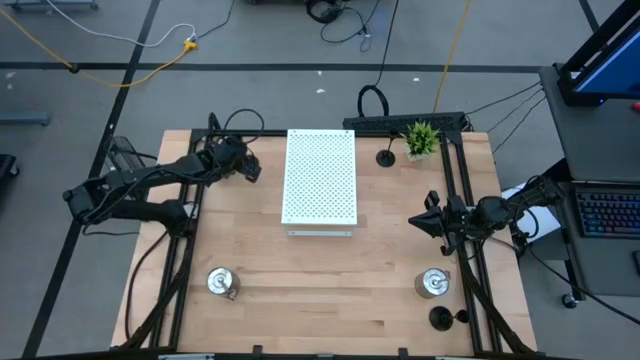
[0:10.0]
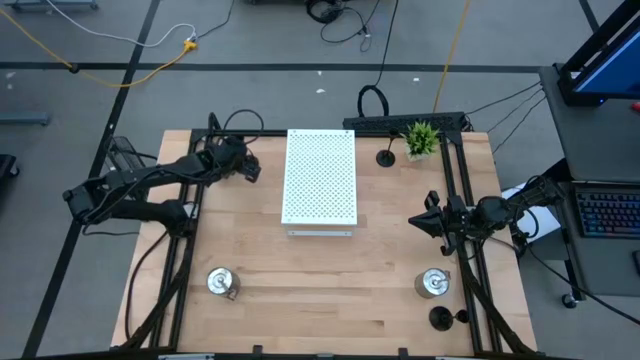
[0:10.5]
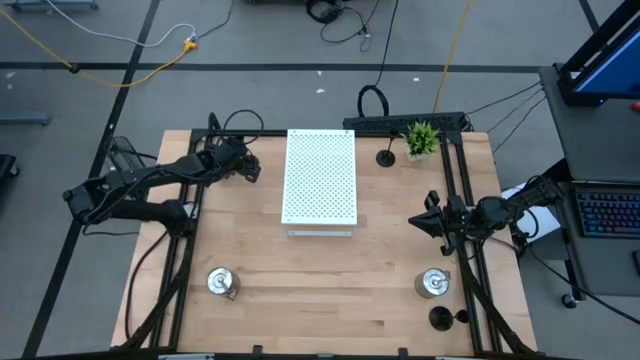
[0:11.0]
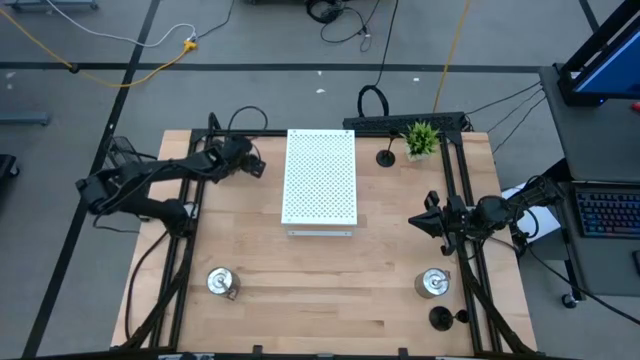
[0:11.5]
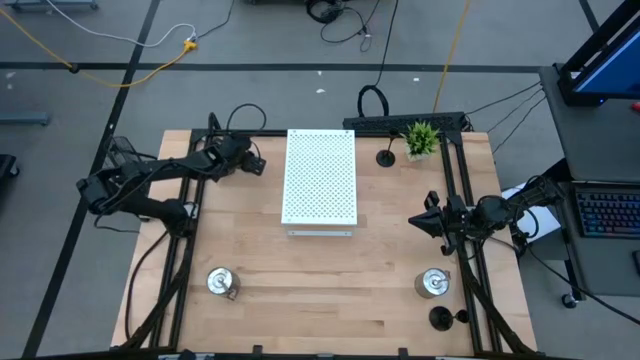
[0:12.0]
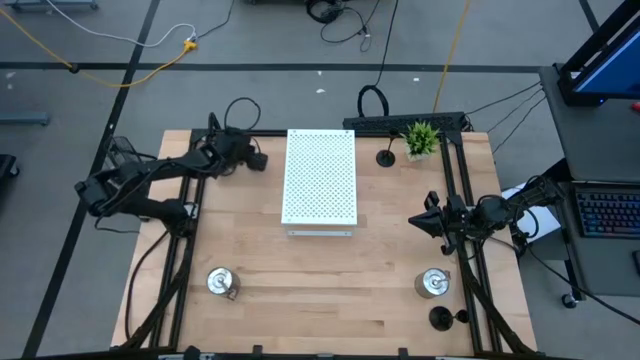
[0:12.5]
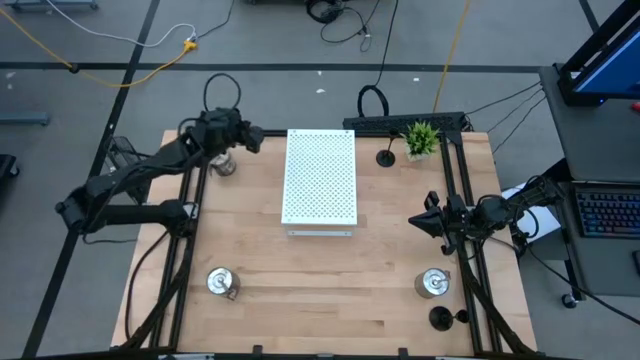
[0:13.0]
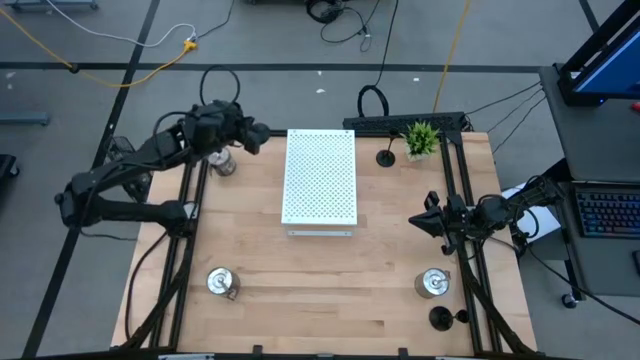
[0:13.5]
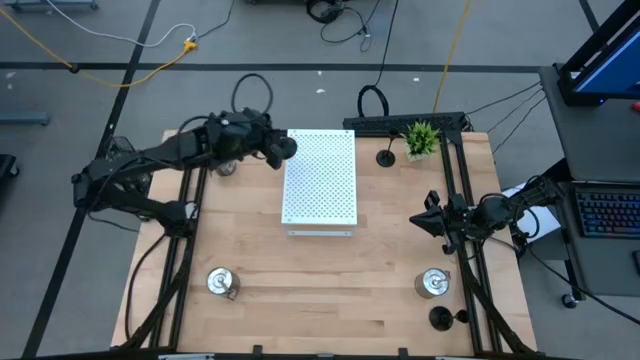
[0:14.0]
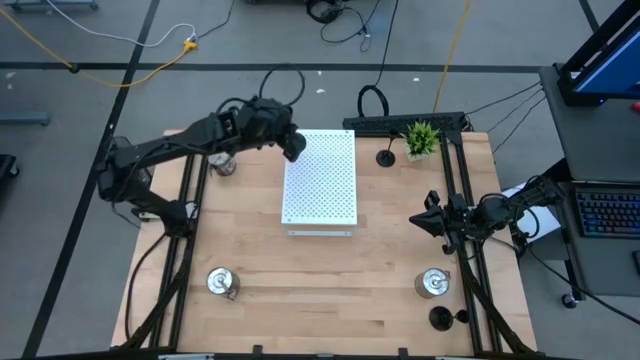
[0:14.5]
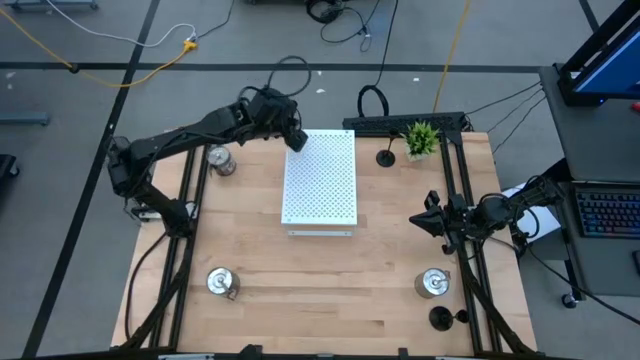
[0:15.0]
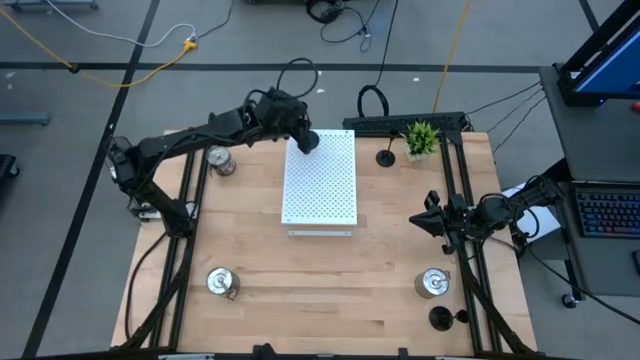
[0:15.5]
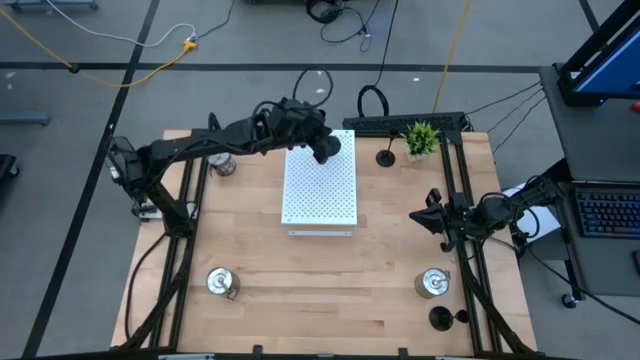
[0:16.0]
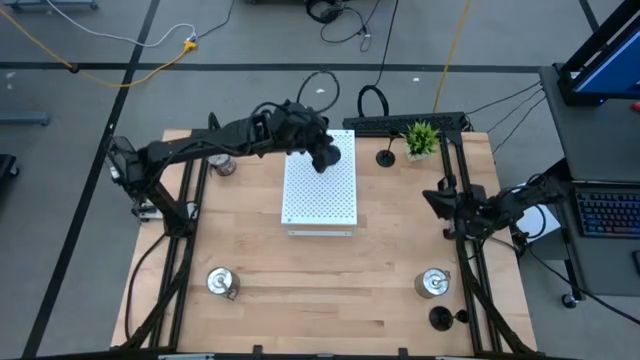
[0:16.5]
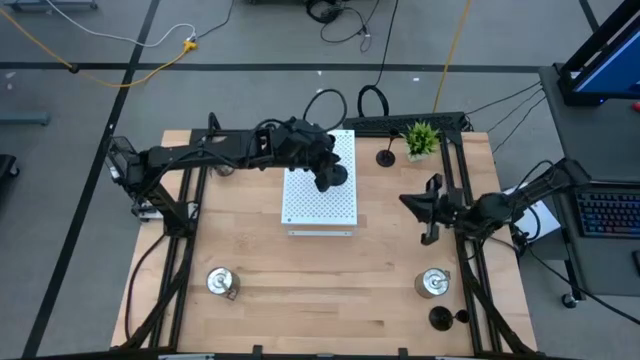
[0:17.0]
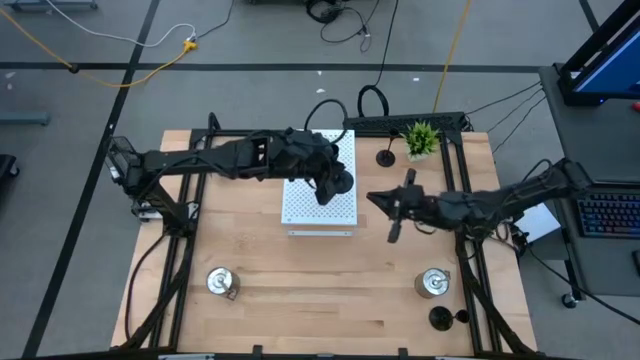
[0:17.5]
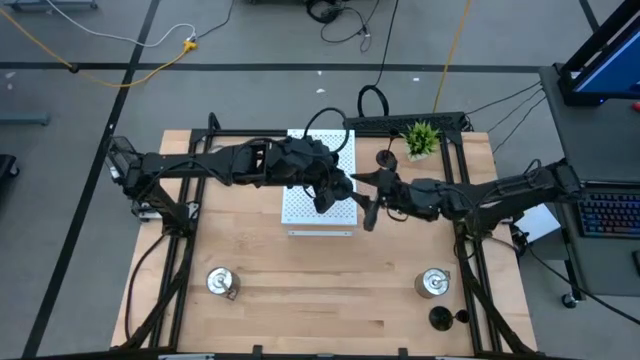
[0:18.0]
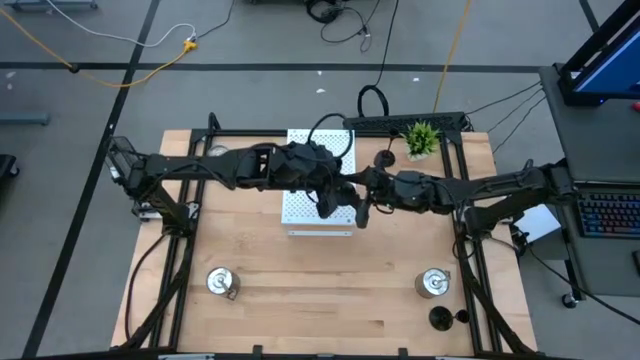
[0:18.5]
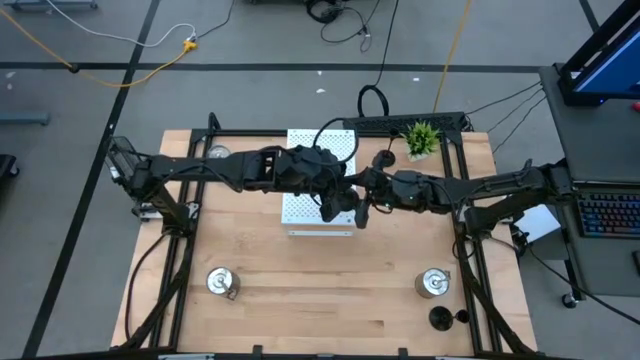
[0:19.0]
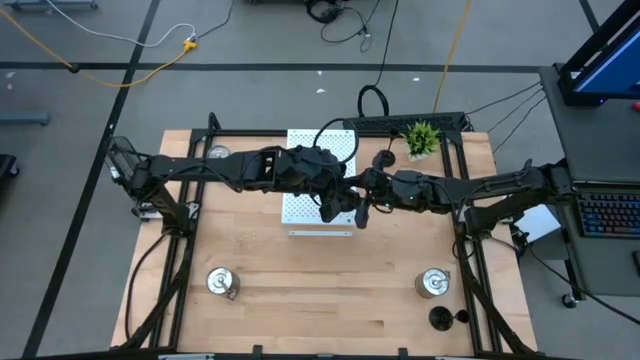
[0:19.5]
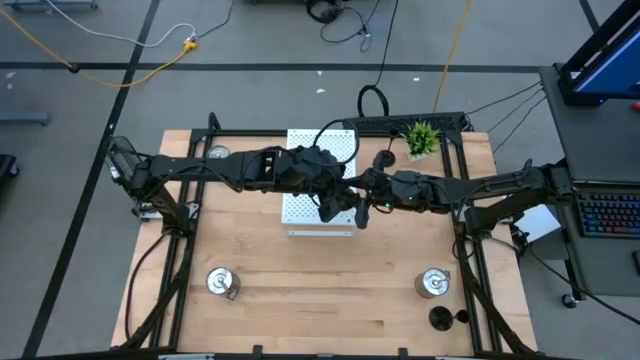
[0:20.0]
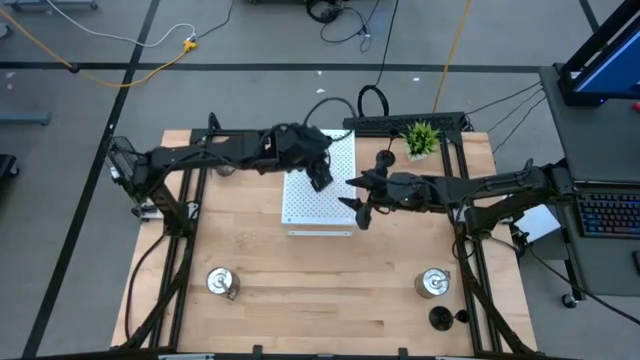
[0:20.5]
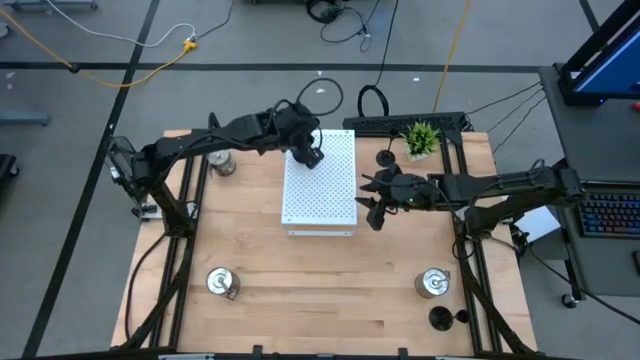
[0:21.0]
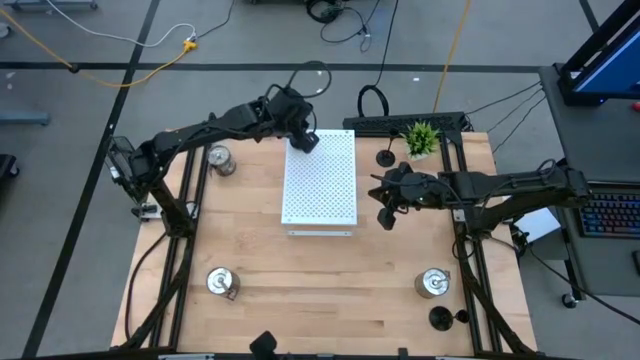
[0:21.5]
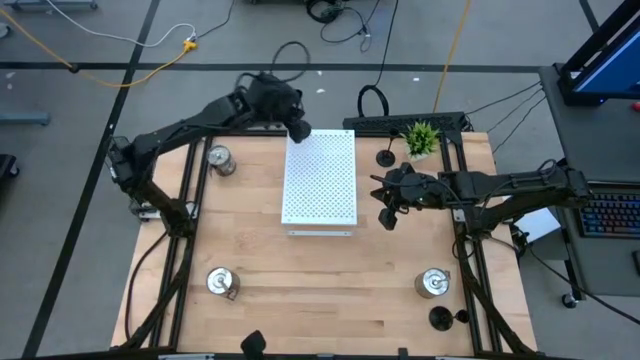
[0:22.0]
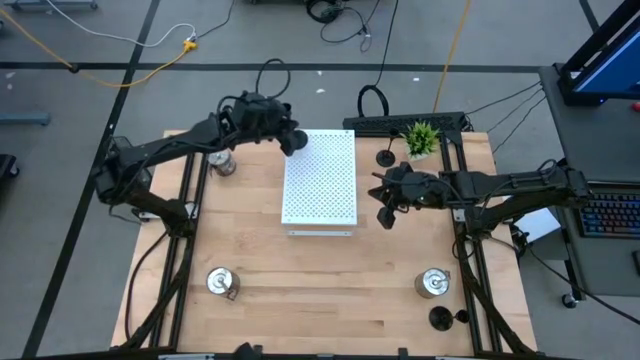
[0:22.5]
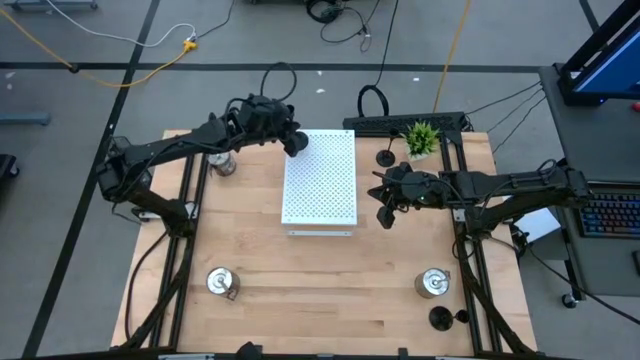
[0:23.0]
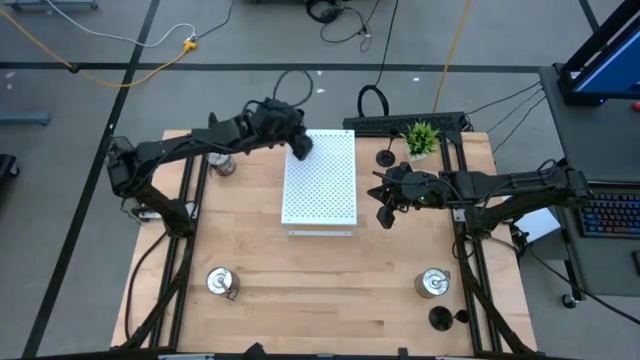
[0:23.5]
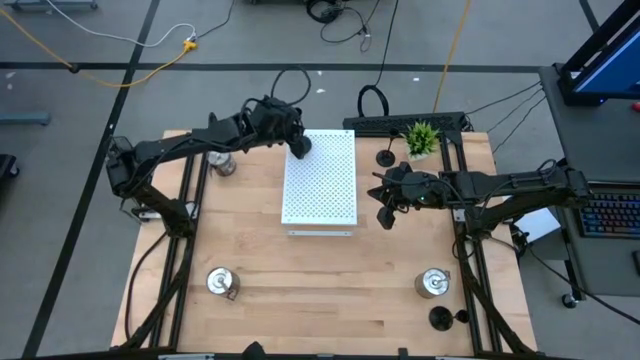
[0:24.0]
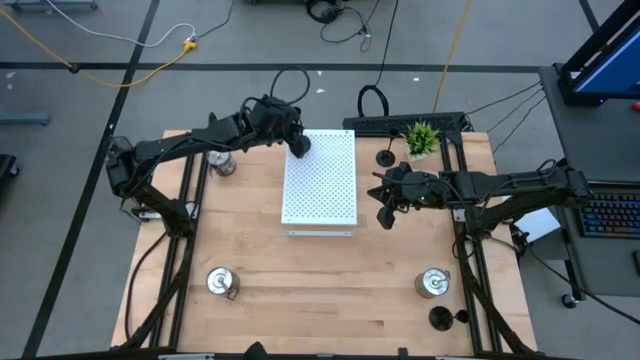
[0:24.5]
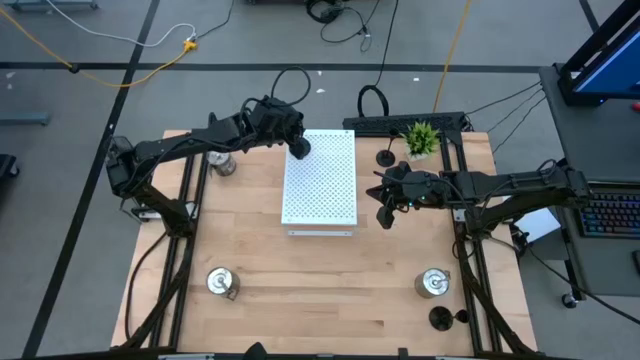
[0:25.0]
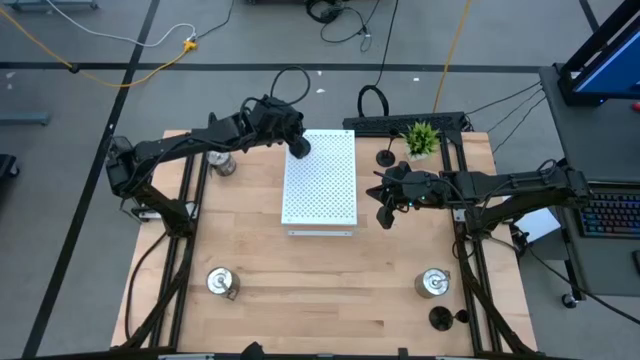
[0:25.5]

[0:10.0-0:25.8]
Task: Pick & Place candle stick holders
Put the top left black candle holder on the shelf

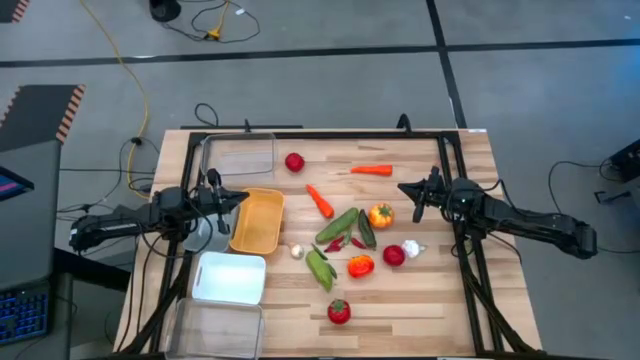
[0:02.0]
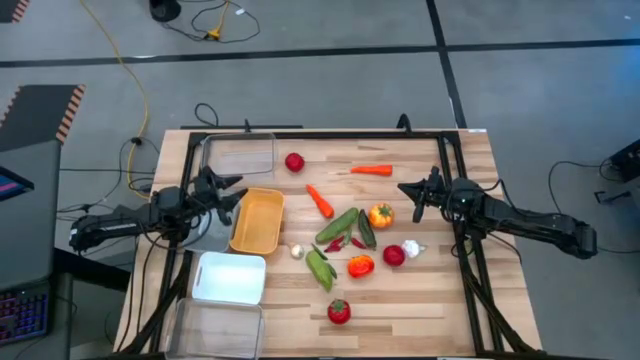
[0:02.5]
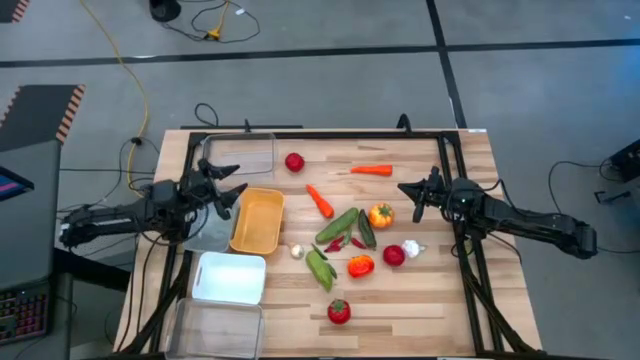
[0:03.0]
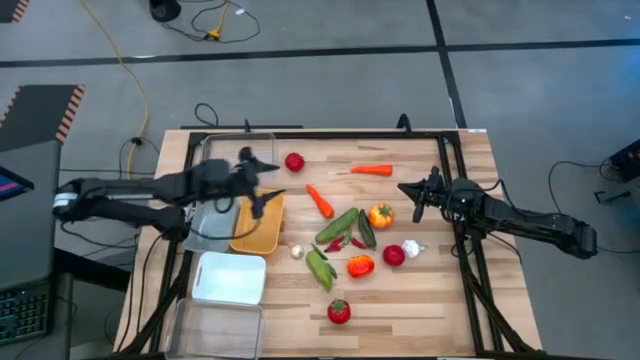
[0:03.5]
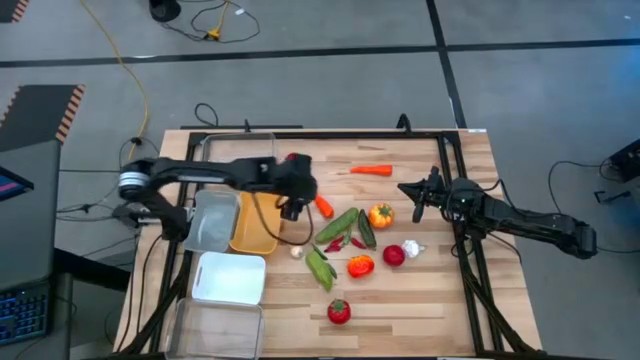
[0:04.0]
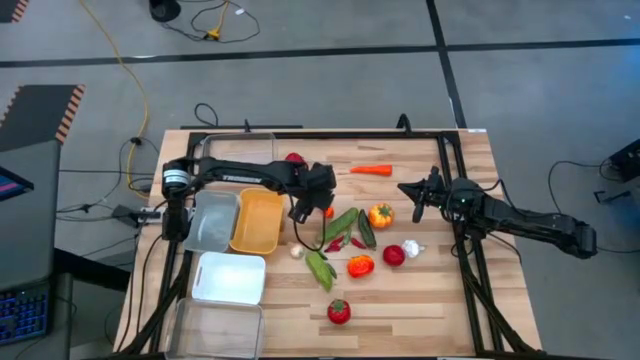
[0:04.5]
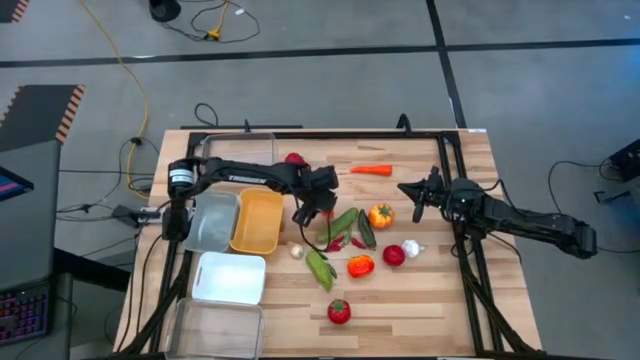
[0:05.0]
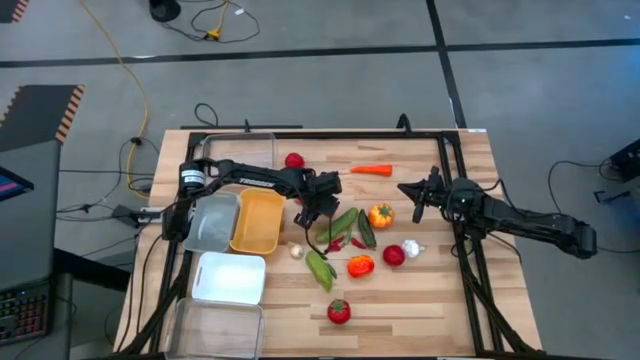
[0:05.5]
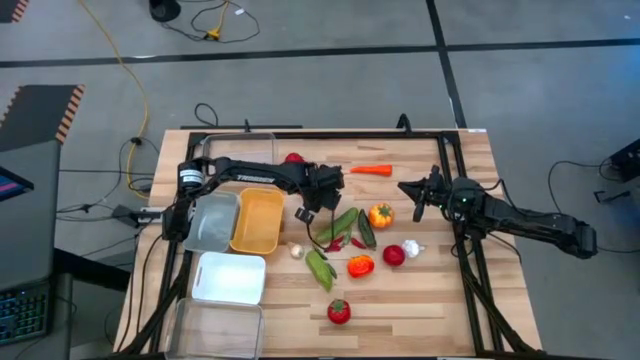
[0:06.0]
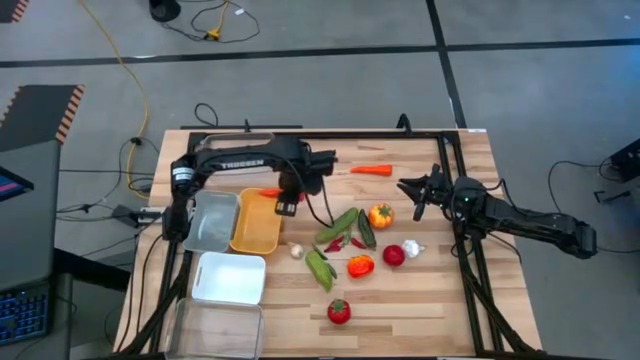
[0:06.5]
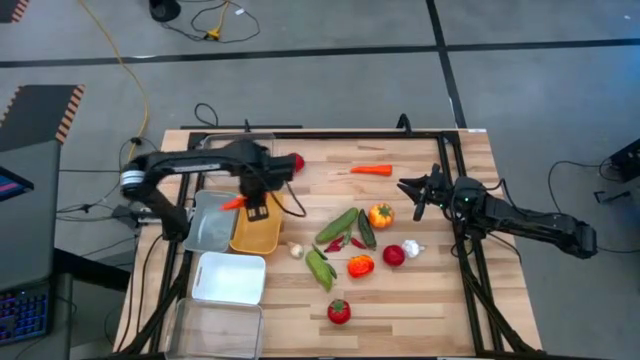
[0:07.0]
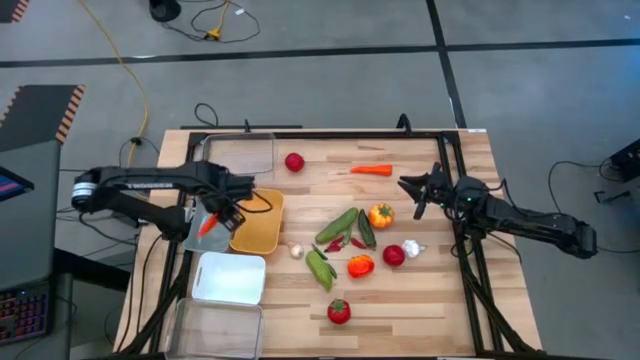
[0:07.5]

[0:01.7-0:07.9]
Task: Sort produce into baskets
Put the left carrot into the gray bin
